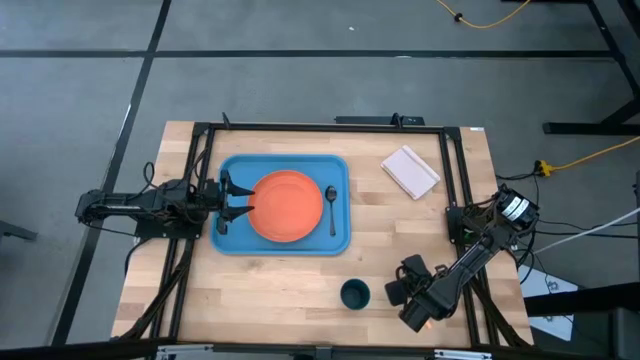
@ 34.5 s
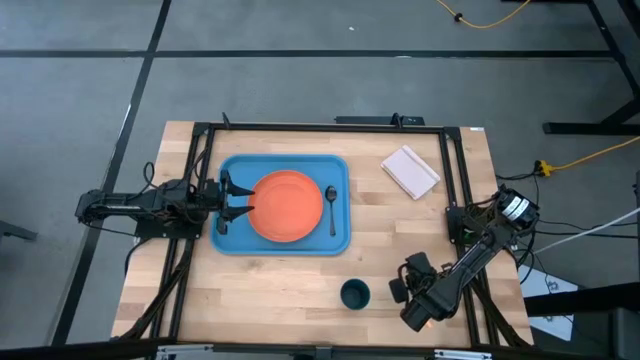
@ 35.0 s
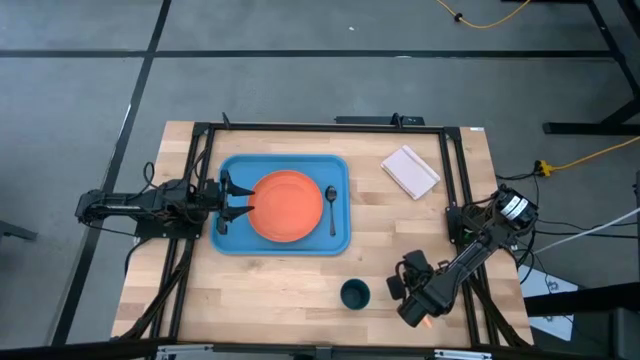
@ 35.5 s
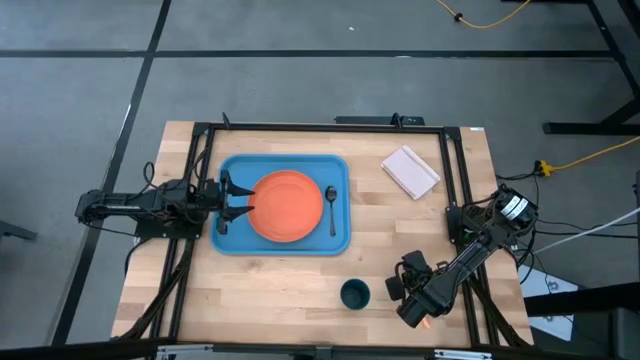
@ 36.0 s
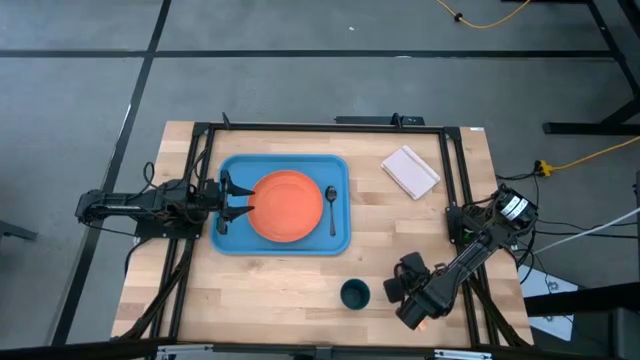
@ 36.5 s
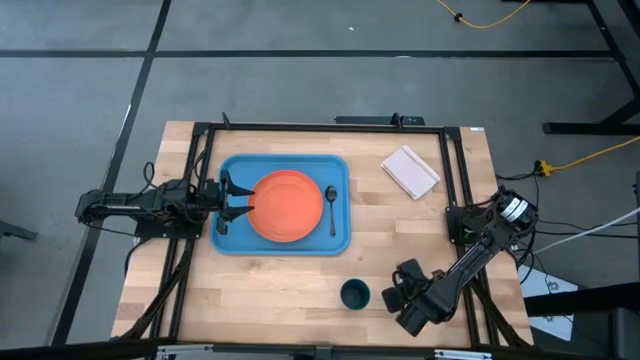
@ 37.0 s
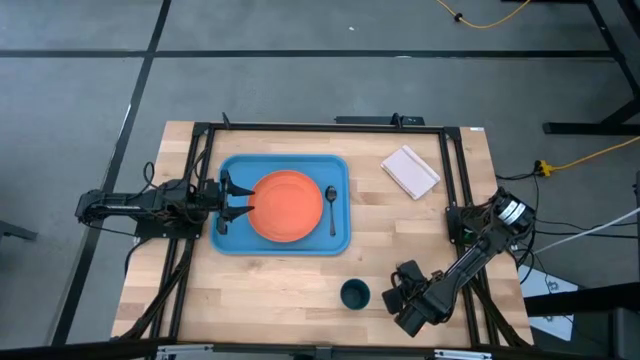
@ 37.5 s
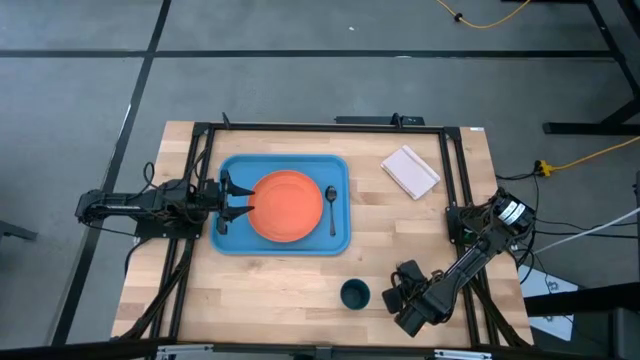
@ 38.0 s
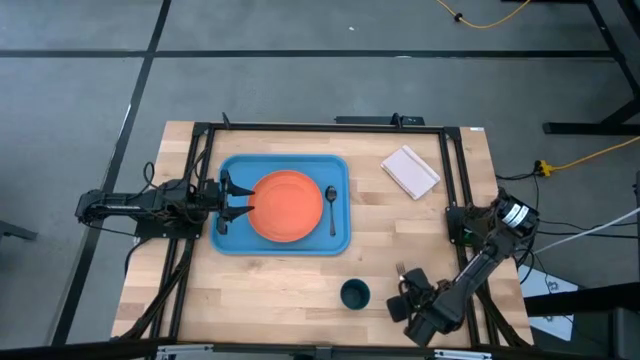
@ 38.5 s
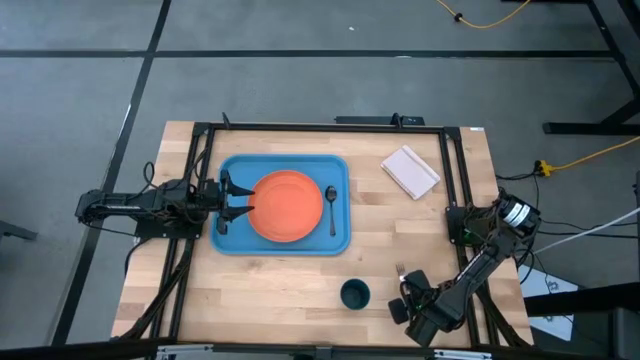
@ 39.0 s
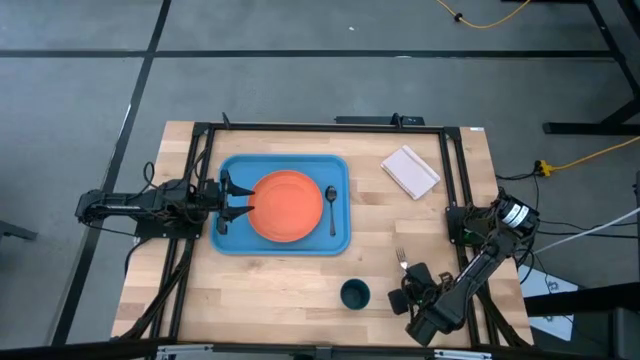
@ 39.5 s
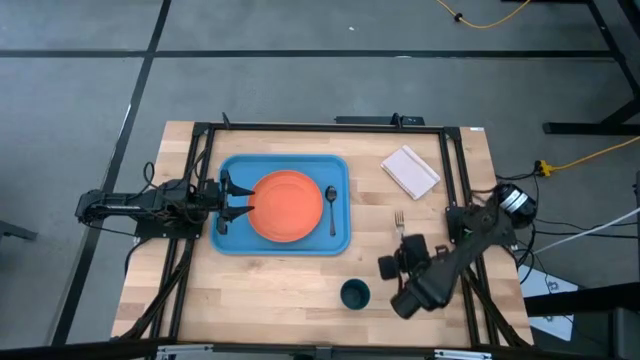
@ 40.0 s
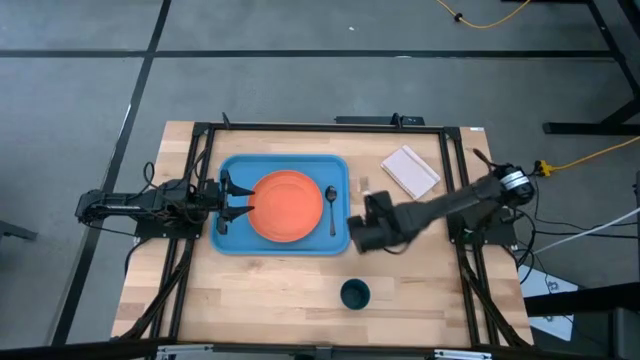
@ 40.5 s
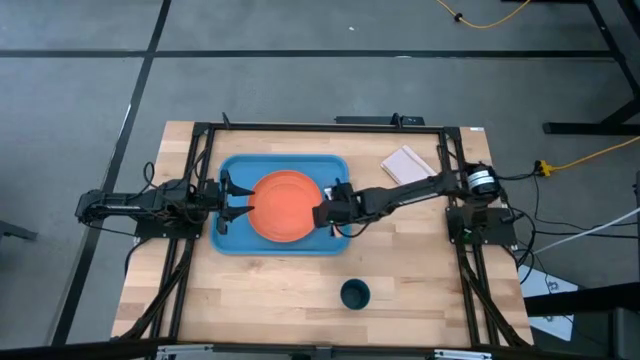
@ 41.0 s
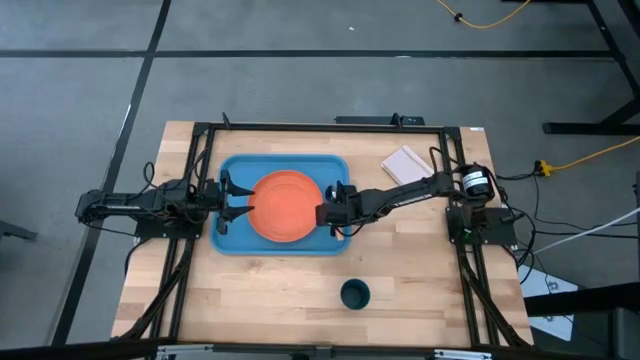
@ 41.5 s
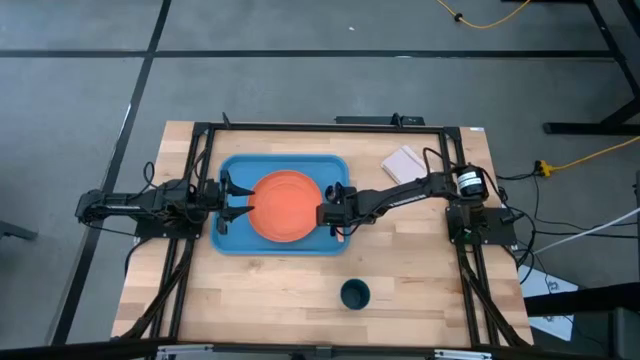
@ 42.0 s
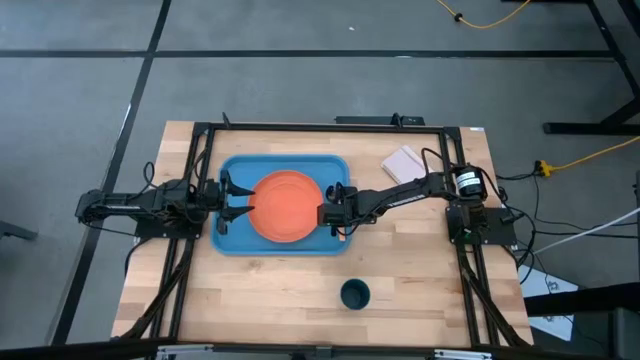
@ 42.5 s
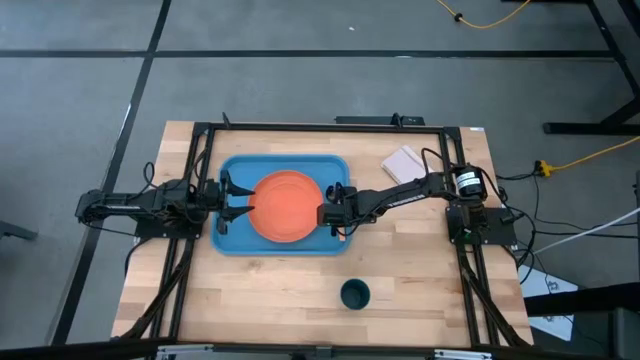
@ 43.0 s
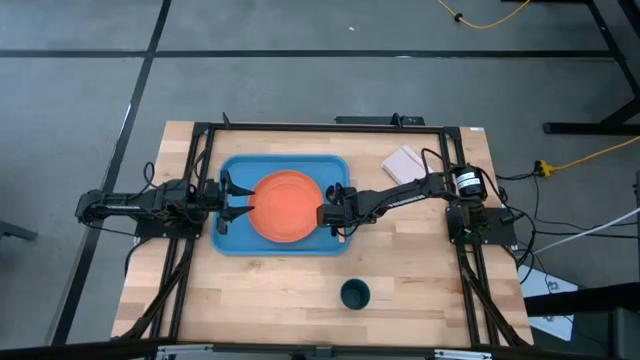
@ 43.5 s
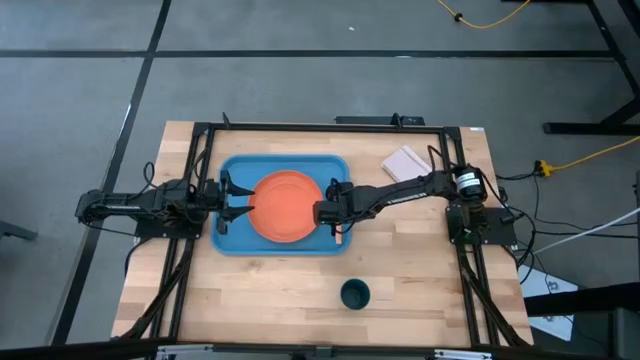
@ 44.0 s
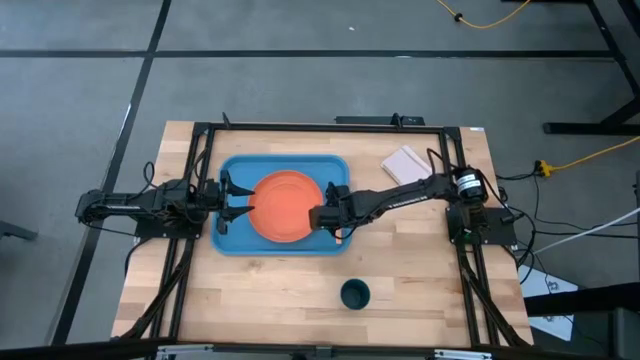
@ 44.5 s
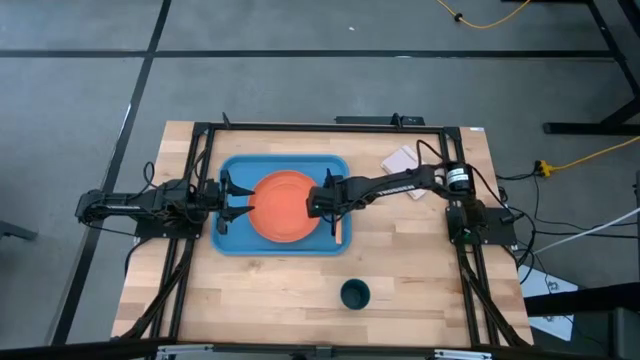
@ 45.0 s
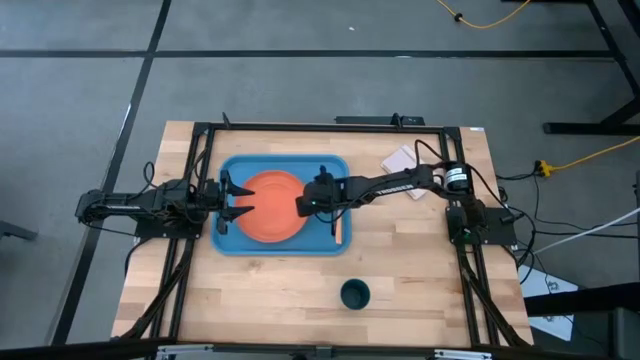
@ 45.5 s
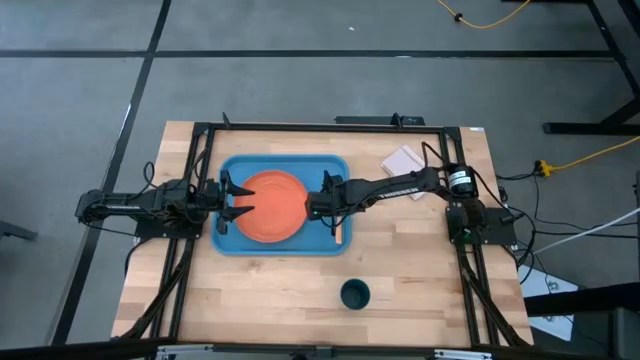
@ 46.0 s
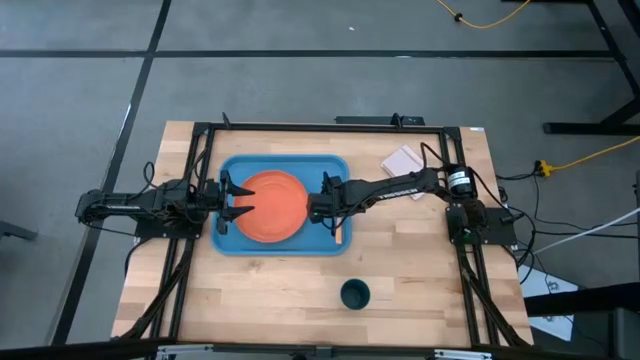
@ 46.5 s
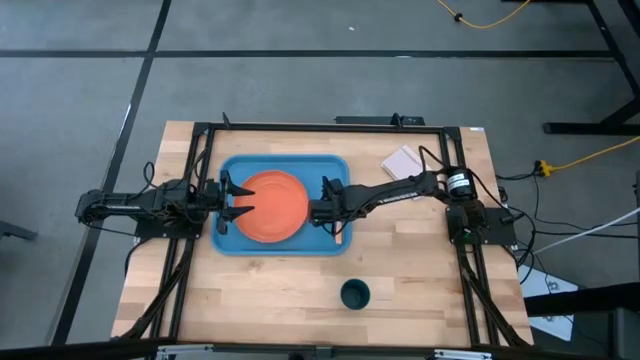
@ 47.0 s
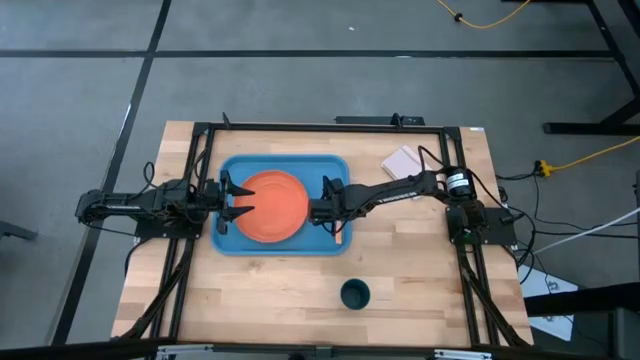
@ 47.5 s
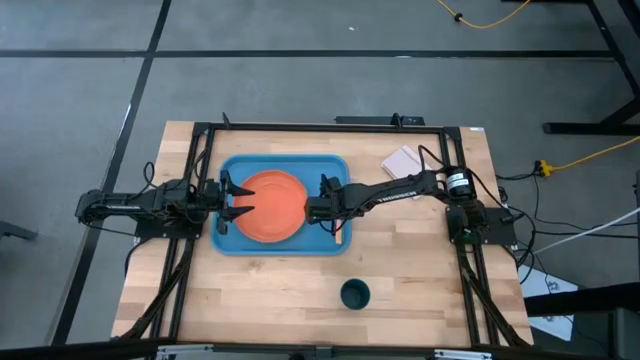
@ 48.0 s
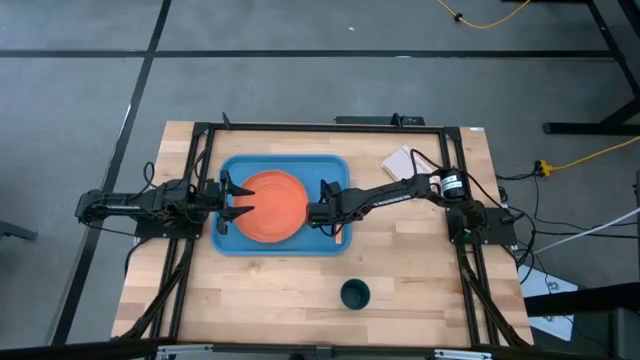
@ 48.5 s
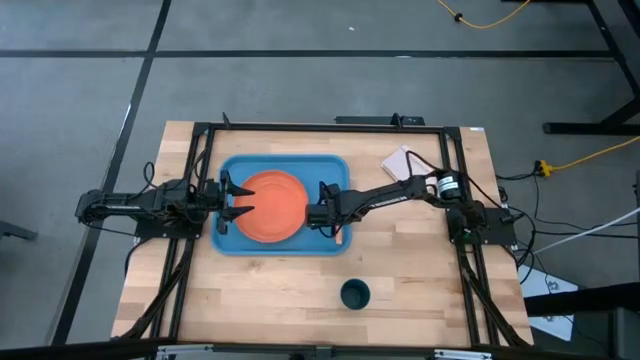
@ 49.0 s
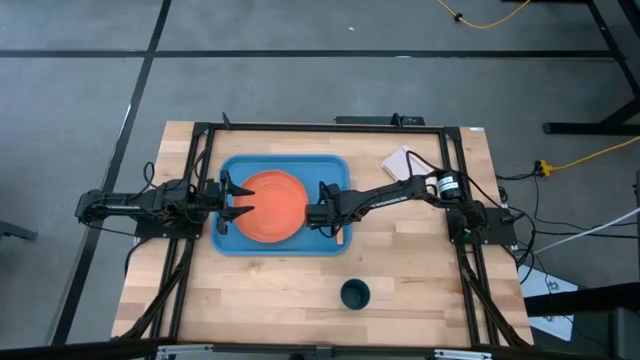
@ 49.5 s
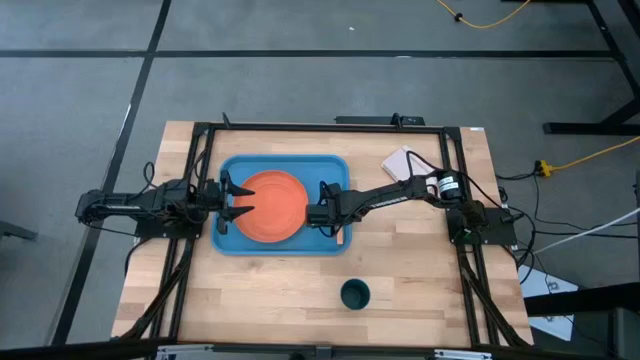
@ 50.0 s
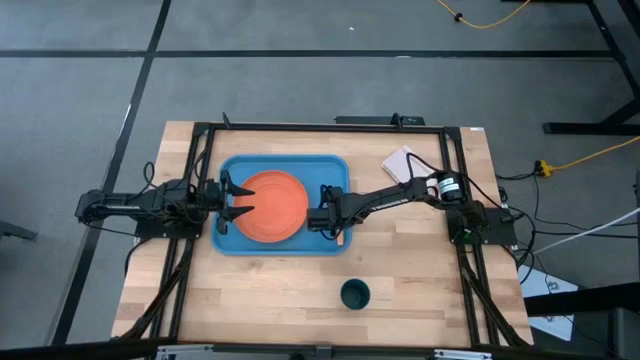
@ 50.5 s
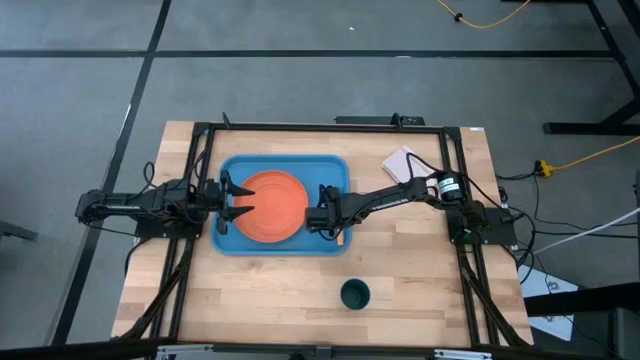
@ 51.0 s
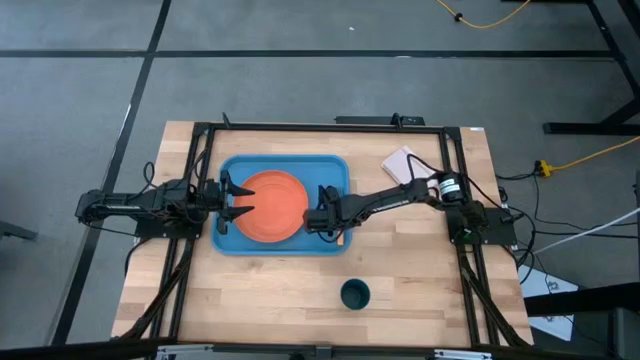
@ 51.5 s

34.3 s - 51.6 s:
Task: Pick and place plate/cup/fork/spoon on tray
Put the orange fork on the blue serving tray at the right of the black spoon

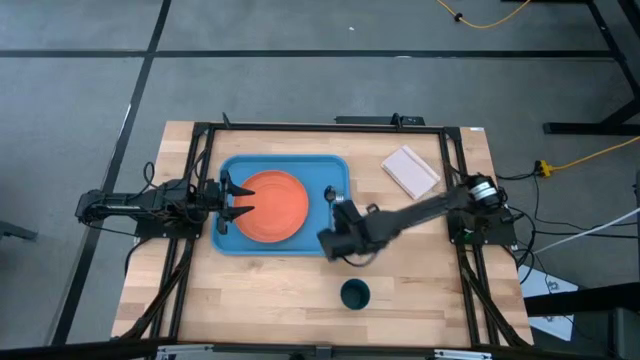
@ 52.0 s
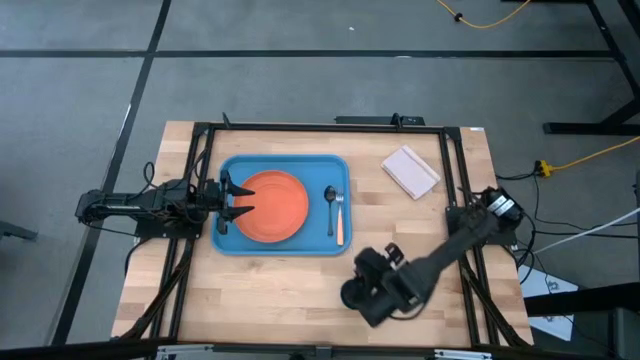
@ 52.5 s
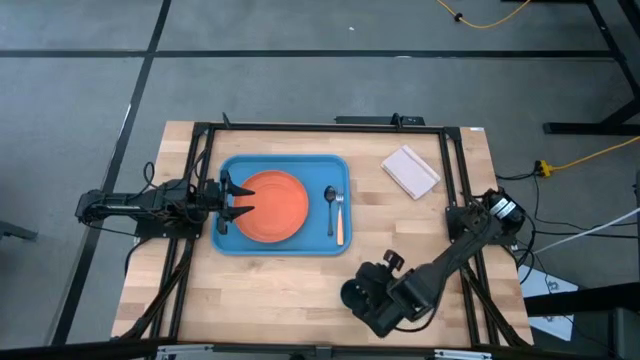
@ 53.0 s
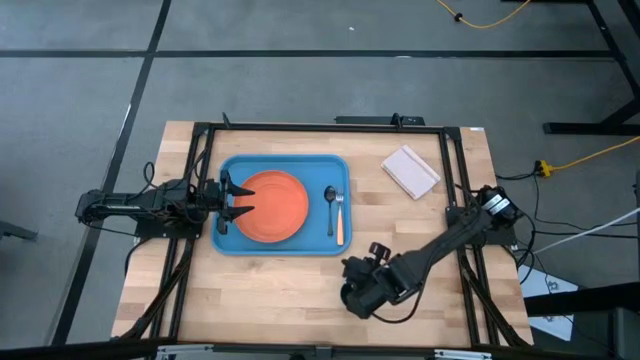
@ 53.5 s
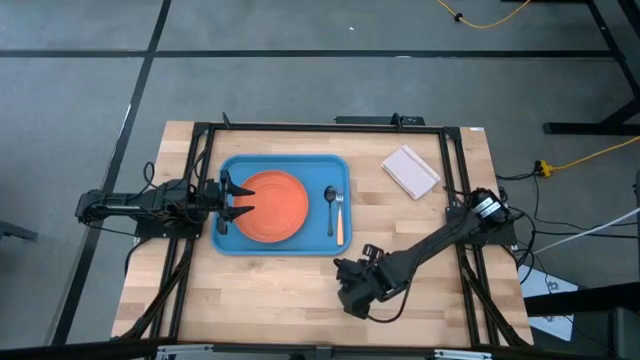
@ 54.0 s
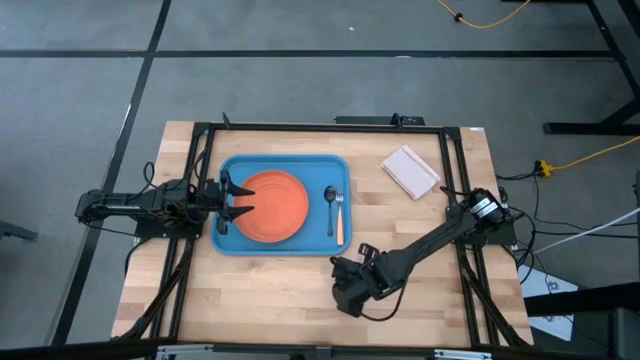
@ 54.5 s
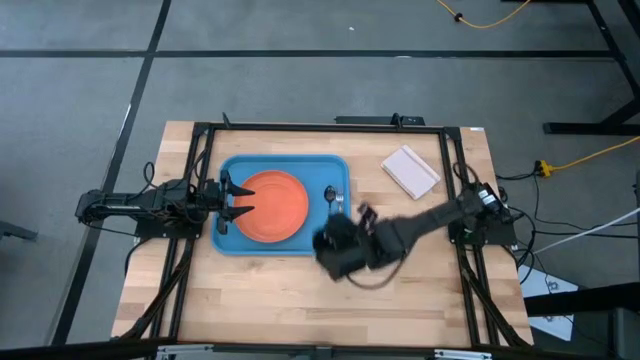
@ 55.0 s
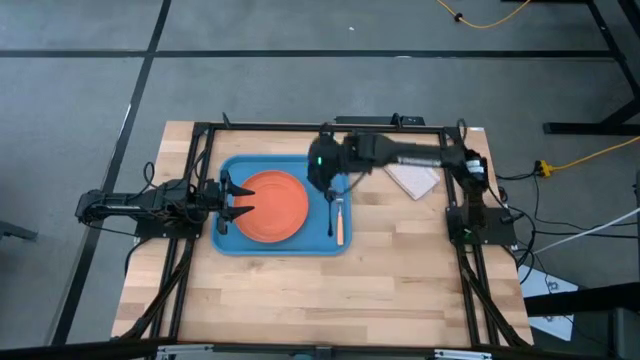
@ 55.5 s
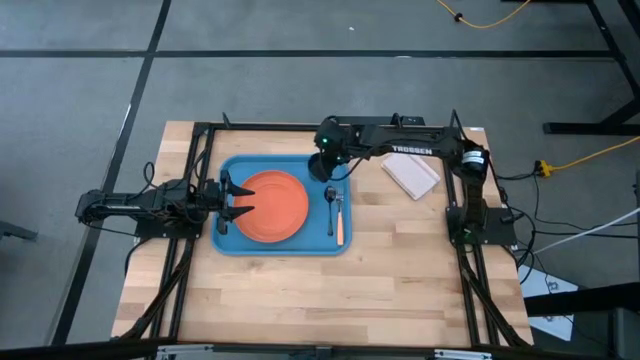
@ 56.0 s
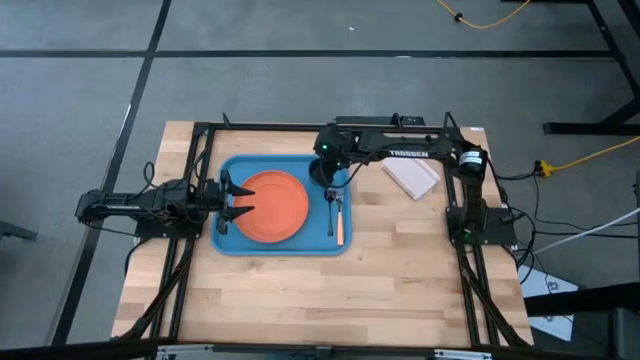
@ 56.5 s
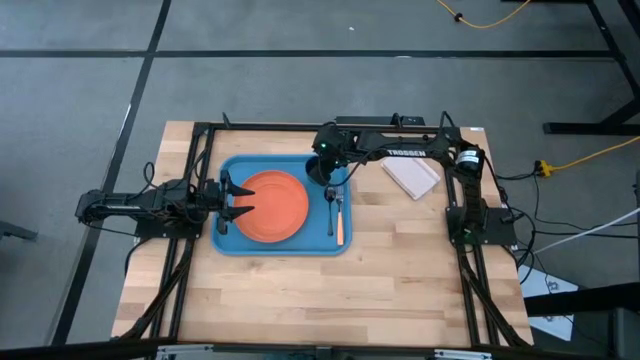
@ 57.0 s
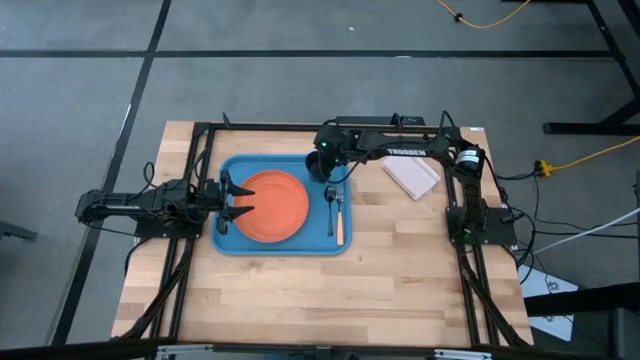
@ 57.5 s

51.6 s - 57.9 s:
Put the dark blue cup on the blue serving tray at the top right of the orange plate
